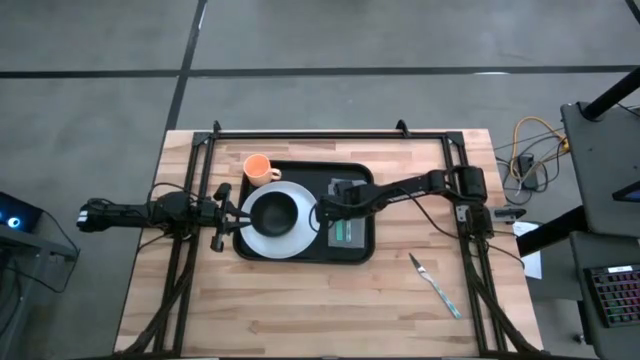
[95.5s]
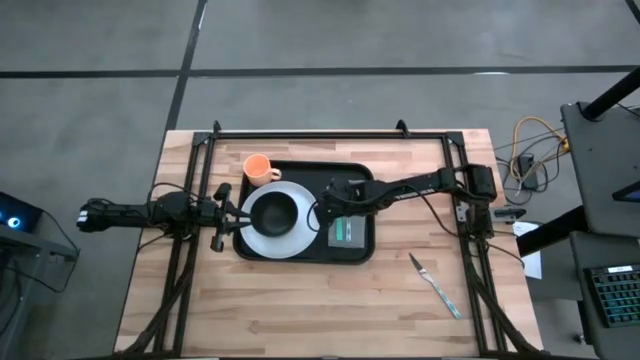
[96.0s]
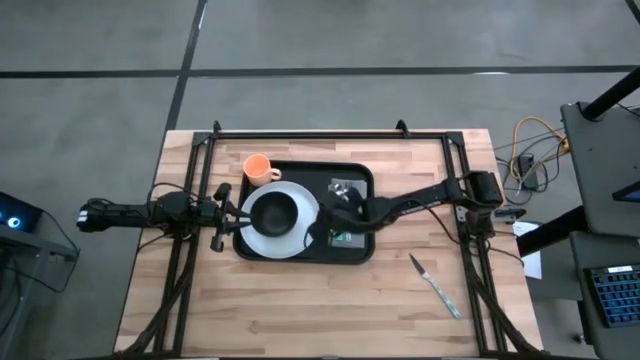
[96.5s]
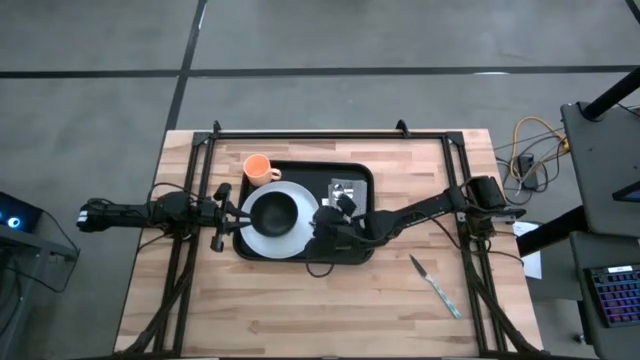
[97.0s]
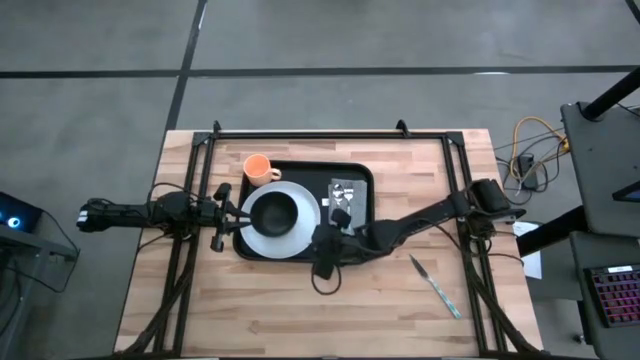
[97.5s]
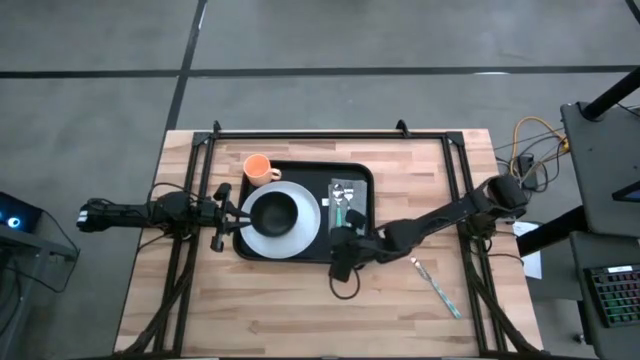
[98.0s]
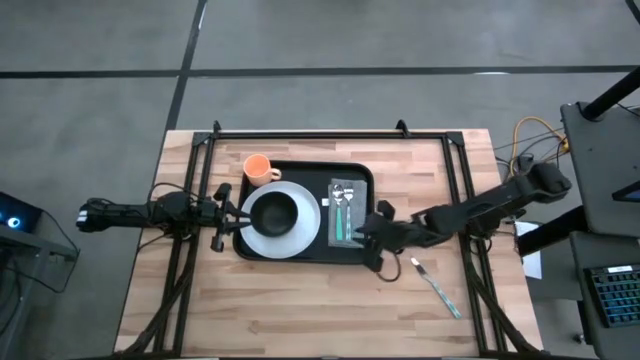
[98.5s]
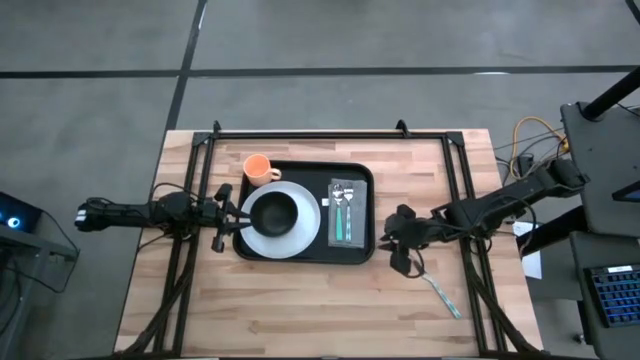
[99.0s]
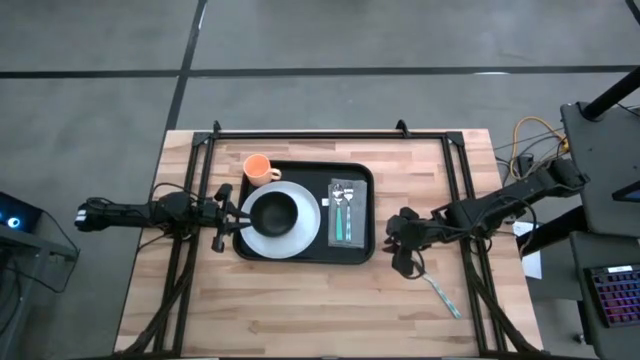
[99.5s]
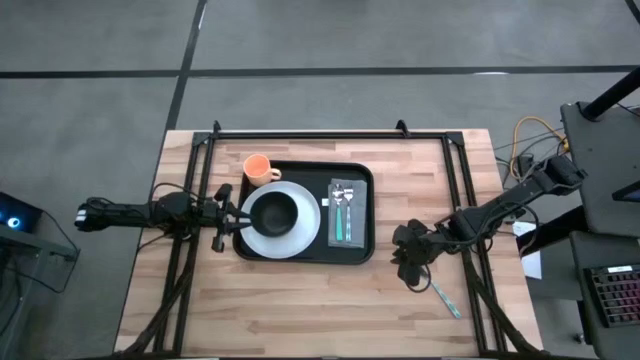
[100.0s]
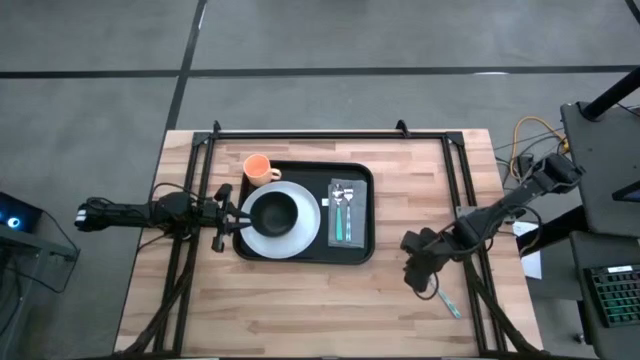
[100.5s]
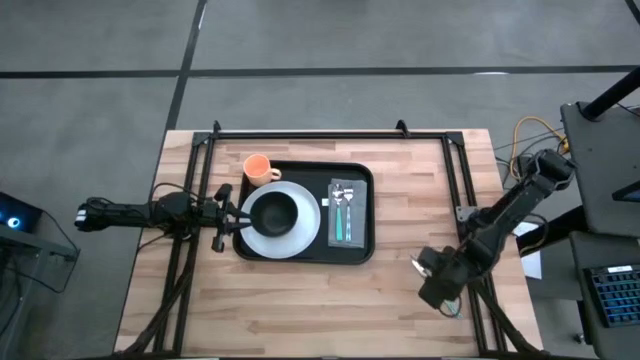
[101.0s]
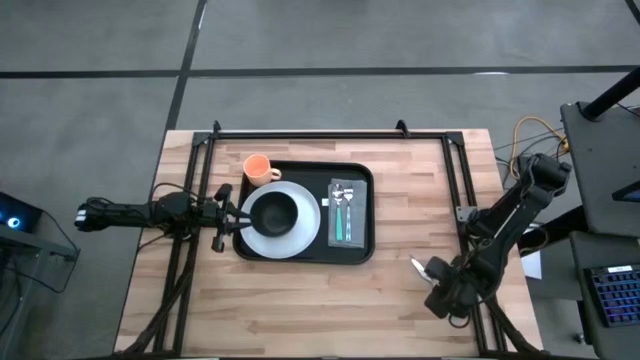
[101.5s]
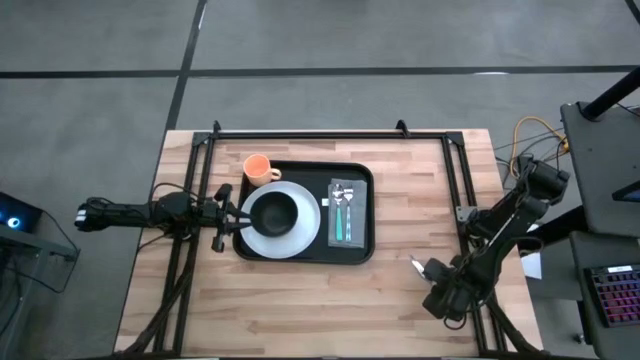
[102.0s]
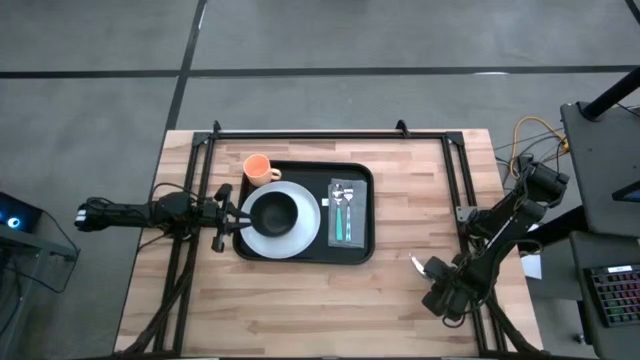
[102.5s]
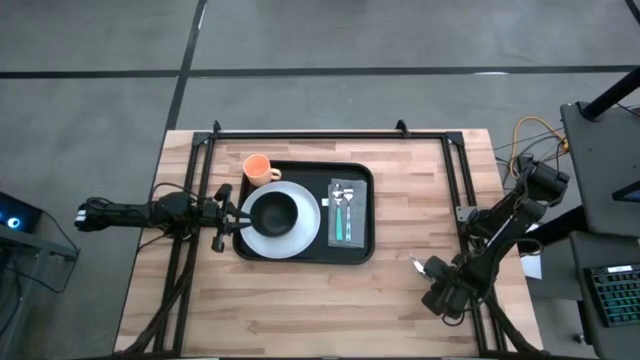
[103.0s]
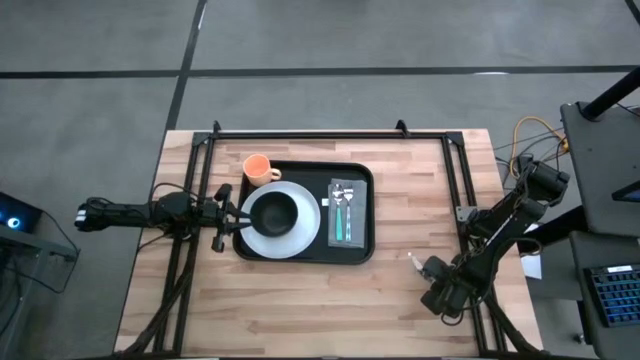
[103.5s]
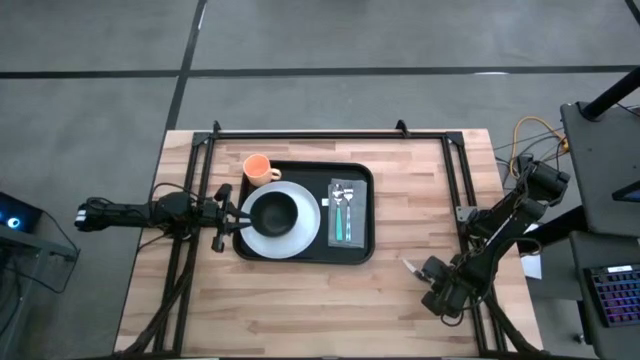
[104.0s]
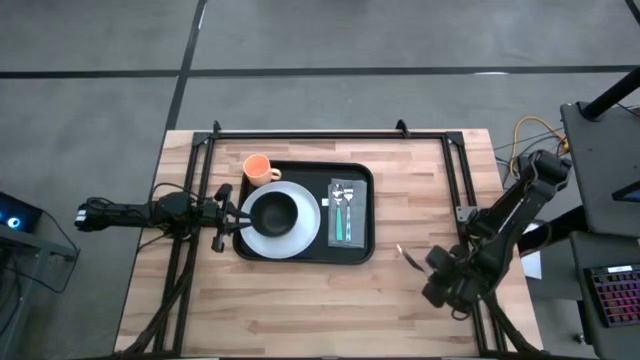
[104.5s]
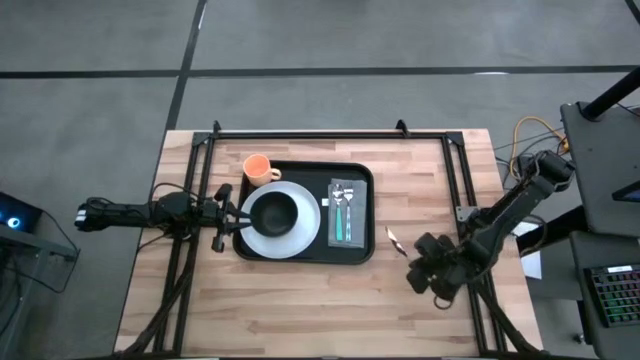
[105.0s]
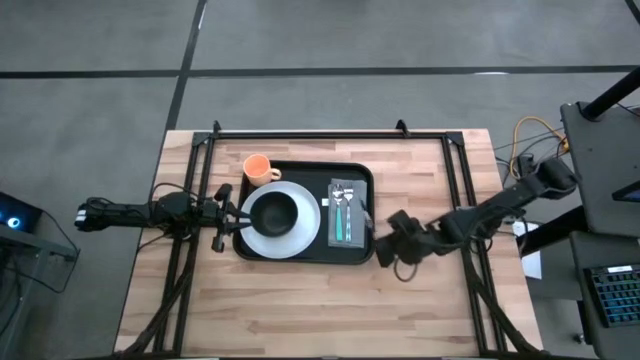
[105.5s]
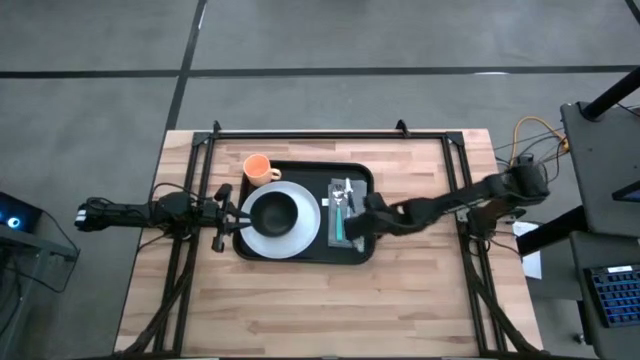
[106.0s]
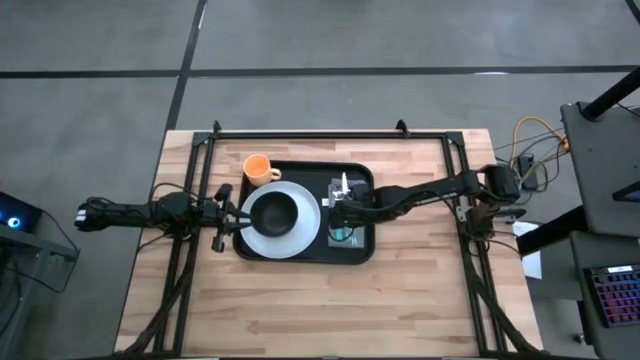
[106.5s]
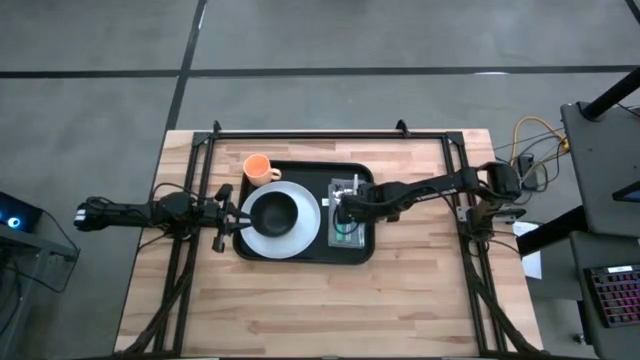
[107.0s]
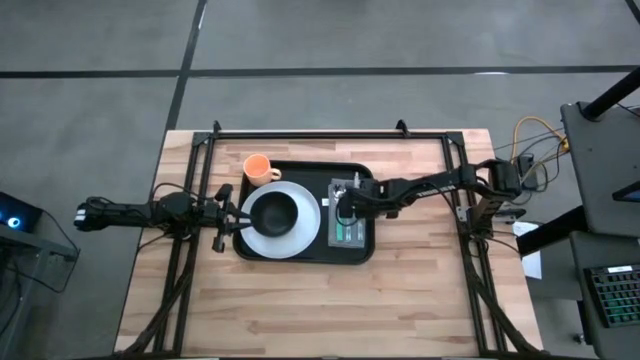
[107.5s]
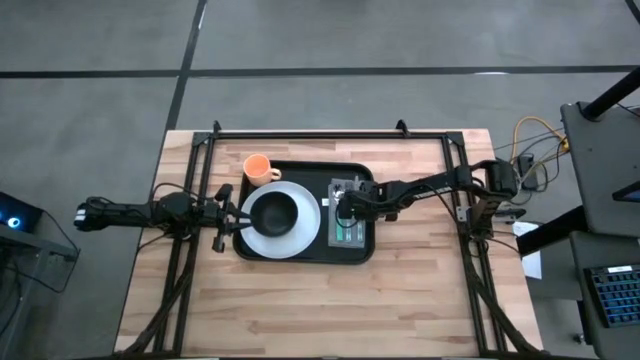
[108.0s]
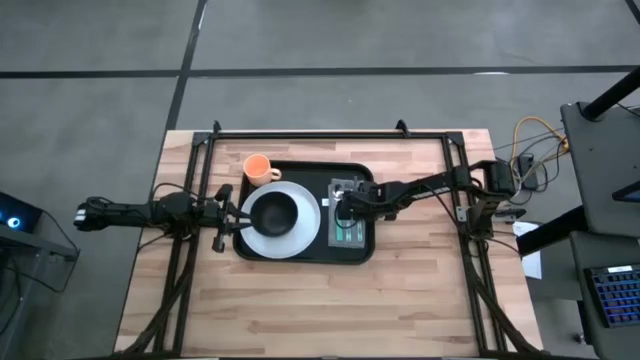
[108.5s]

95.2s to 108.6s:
Task: Set up tray
Put the white and blue knife on the gray napkin to the right of the white and blue fork

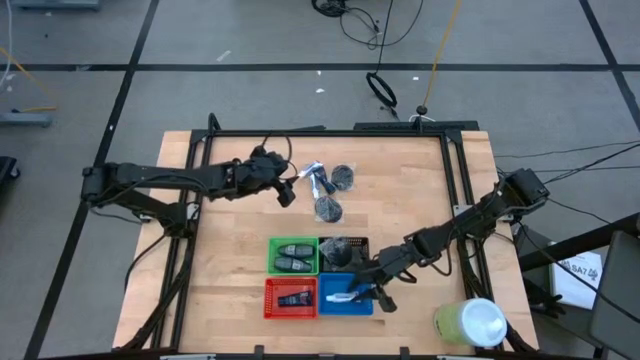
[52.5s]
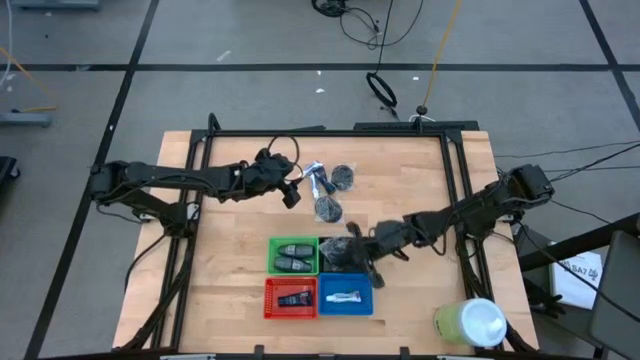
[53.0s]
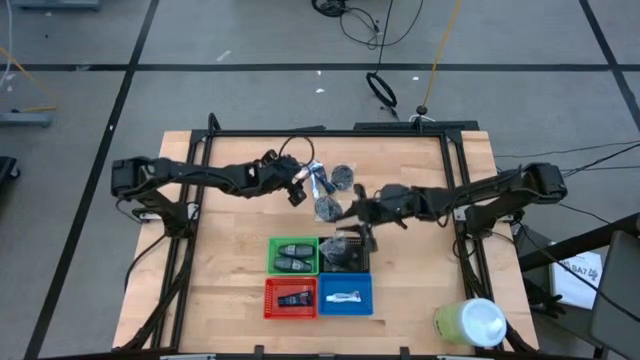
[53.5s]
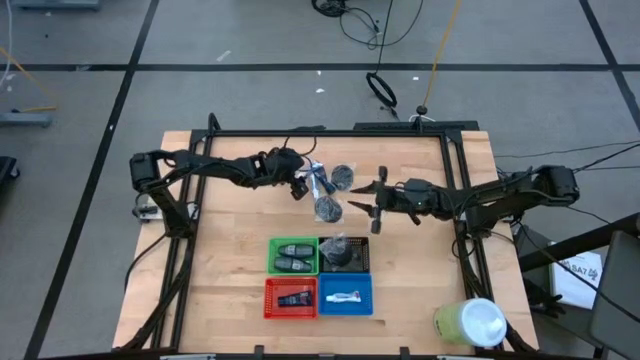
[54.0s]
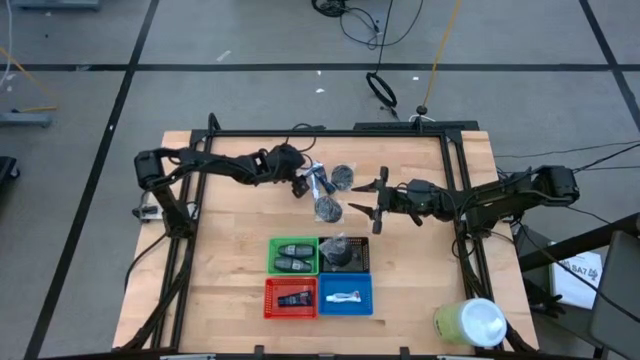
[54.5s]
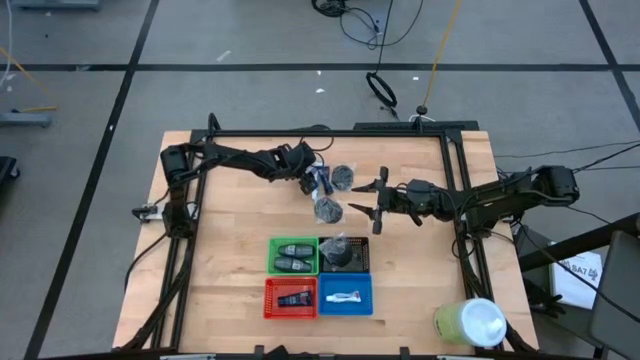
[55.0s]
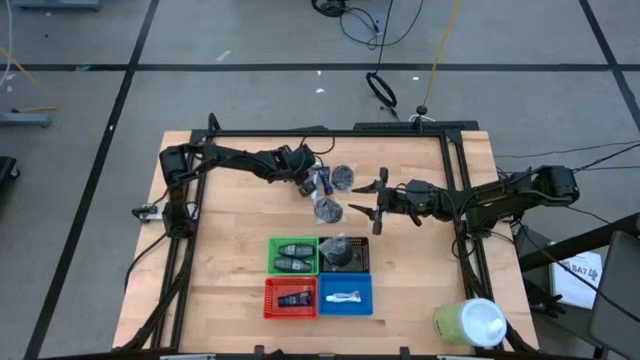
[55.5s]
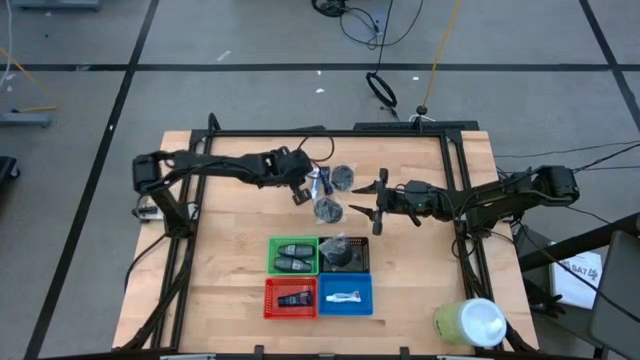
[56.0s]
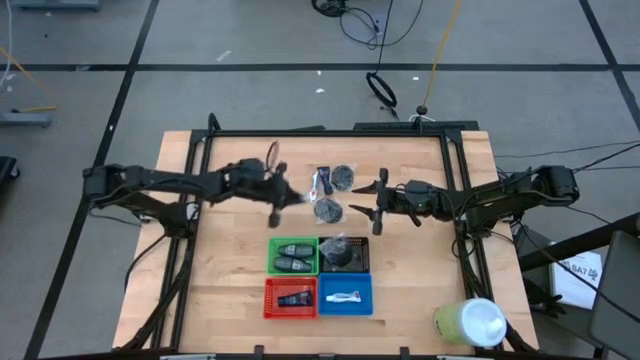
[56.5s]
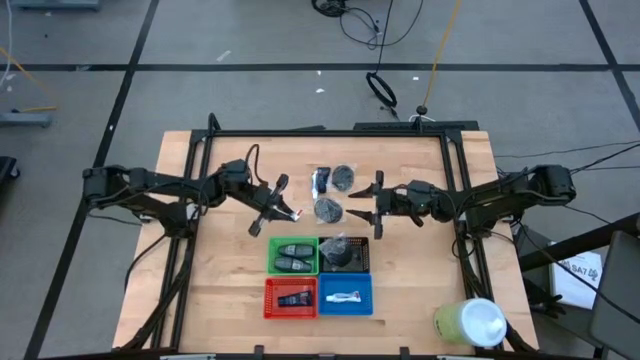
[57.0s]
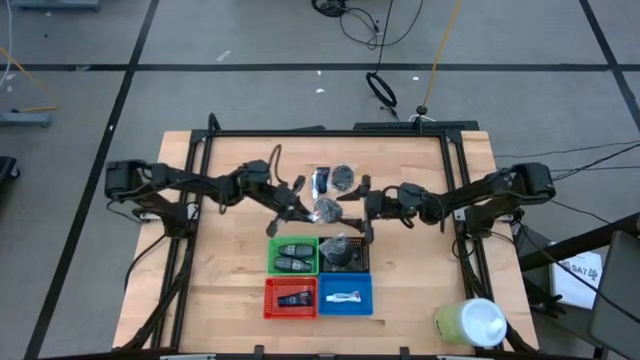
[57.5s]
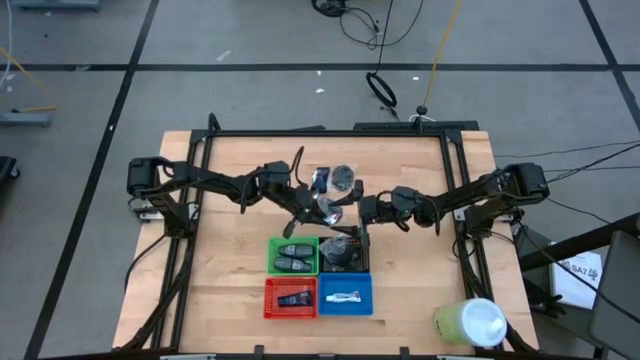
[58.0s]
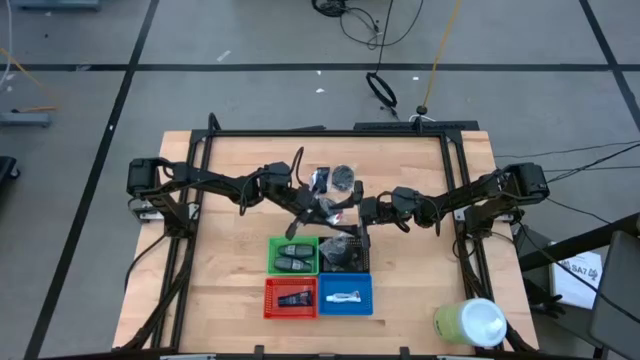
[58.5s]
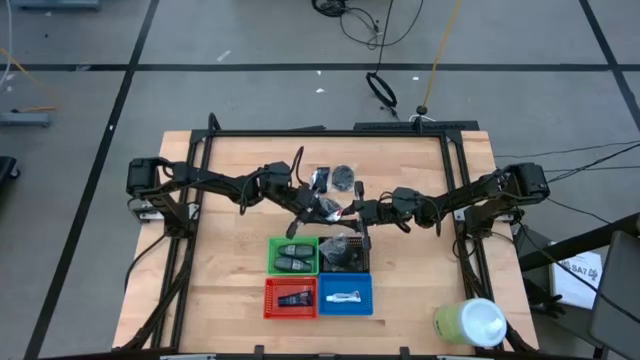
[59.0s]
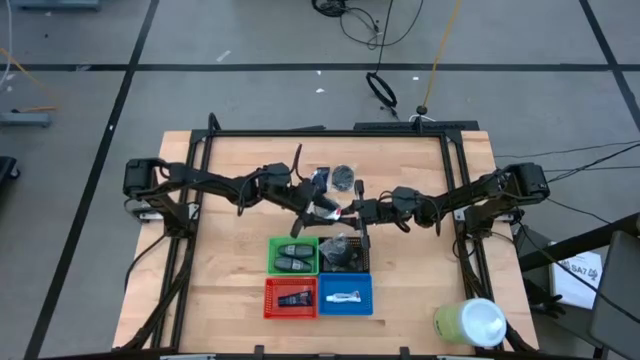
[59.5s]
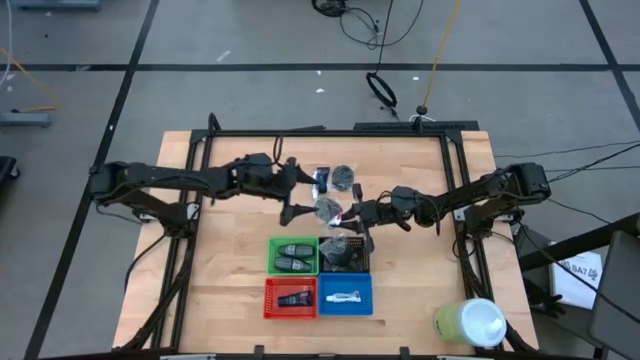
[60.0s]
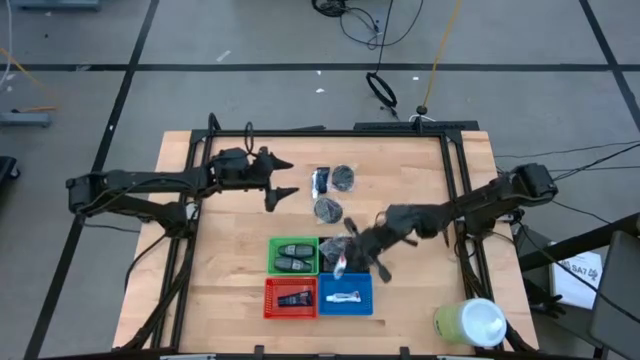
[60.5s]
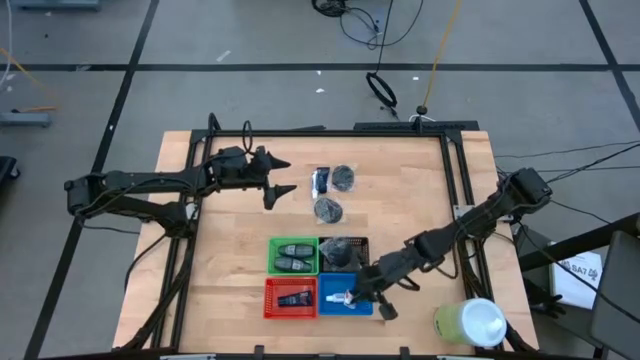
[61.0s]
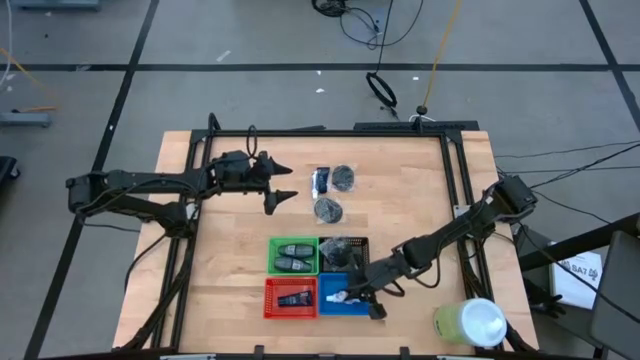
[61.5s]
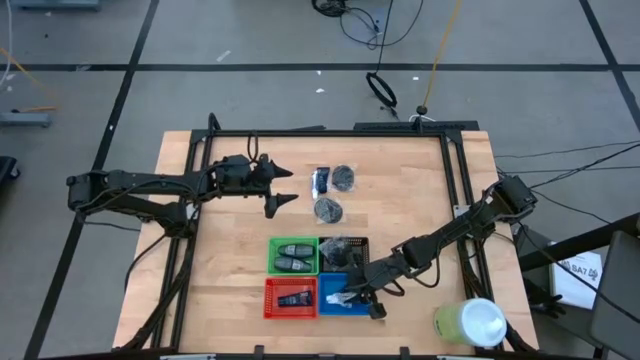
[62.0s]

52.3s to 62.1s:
Task: Pick & Place Travel size toiletries
Put the top white toothpaste into the blue bin
